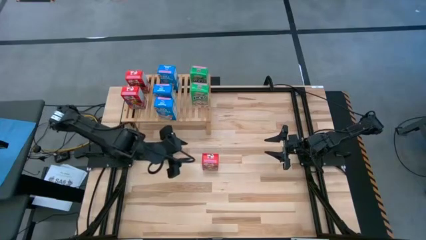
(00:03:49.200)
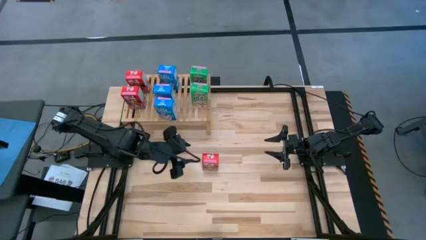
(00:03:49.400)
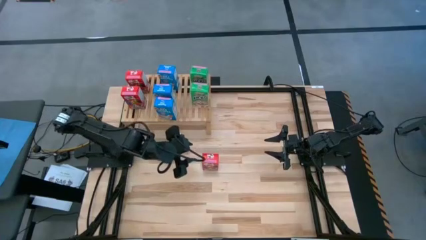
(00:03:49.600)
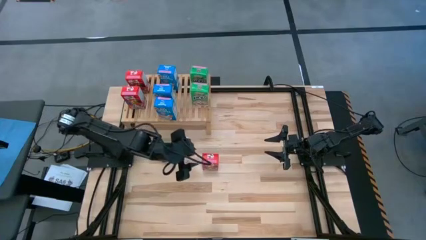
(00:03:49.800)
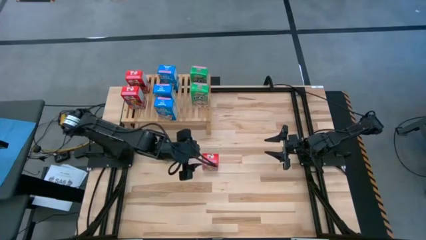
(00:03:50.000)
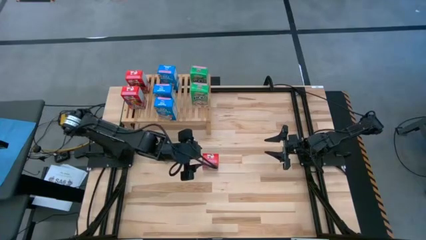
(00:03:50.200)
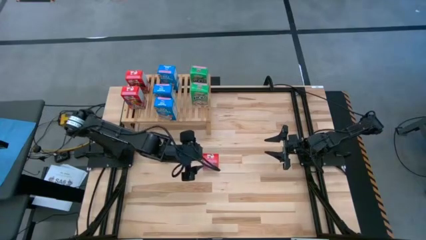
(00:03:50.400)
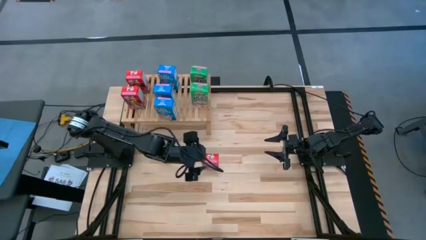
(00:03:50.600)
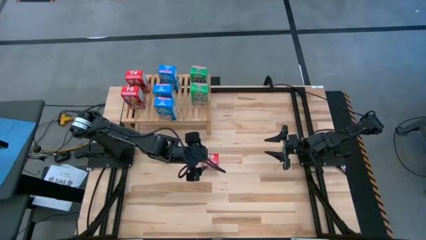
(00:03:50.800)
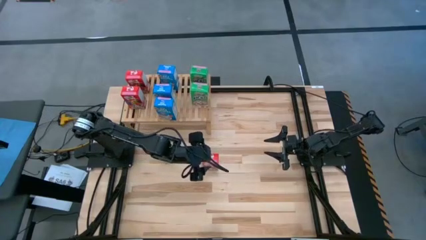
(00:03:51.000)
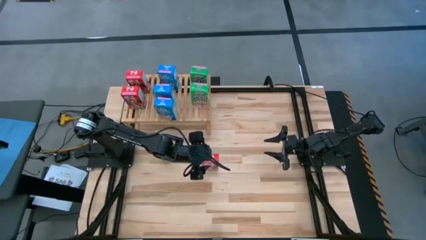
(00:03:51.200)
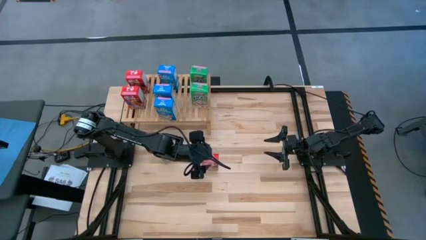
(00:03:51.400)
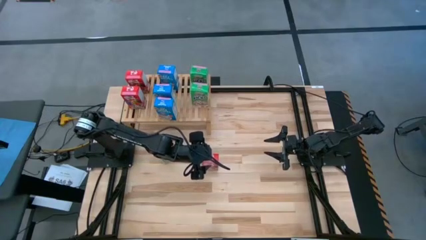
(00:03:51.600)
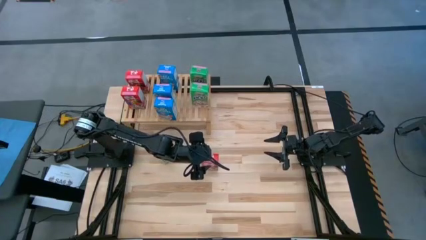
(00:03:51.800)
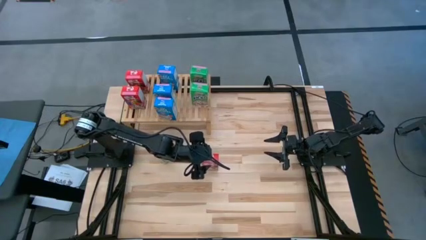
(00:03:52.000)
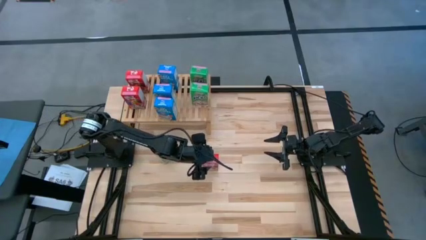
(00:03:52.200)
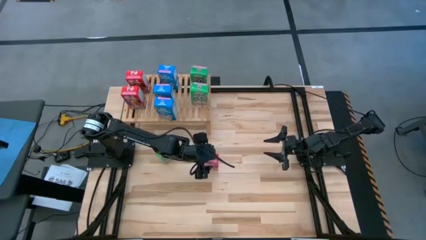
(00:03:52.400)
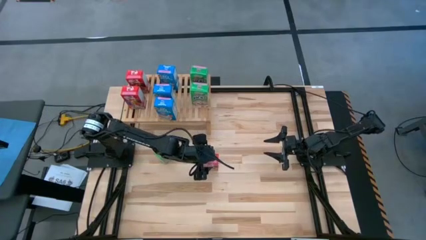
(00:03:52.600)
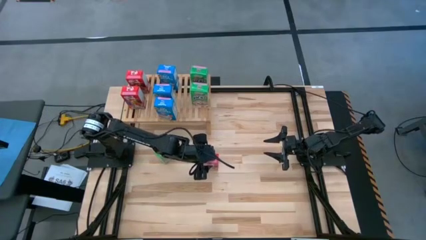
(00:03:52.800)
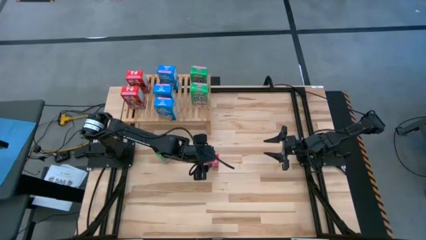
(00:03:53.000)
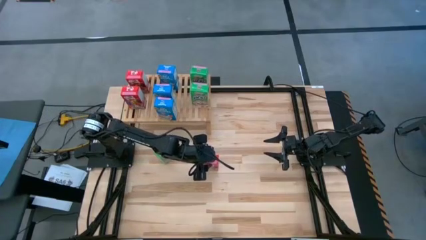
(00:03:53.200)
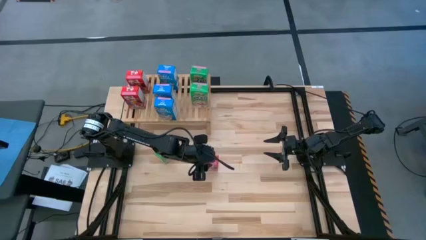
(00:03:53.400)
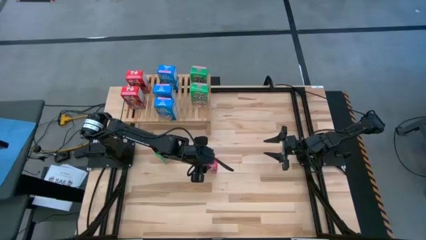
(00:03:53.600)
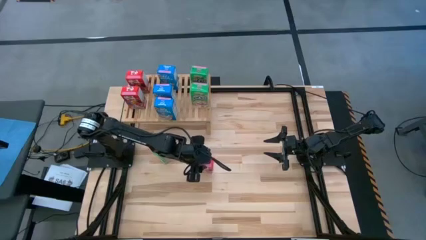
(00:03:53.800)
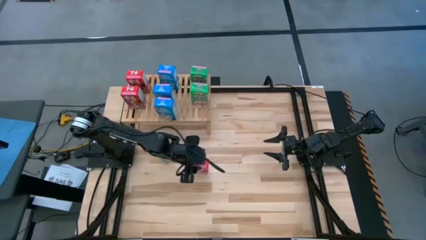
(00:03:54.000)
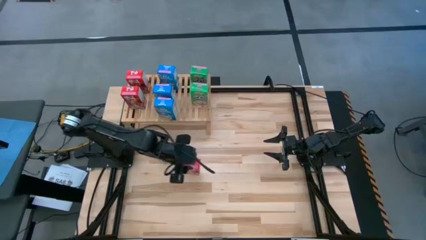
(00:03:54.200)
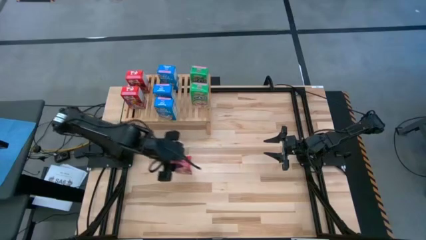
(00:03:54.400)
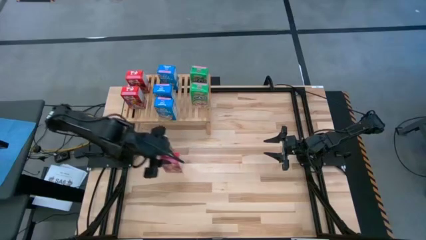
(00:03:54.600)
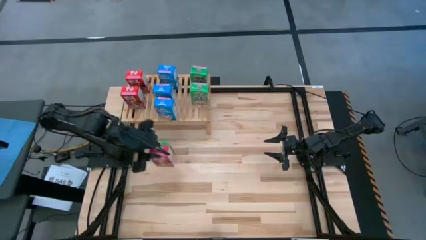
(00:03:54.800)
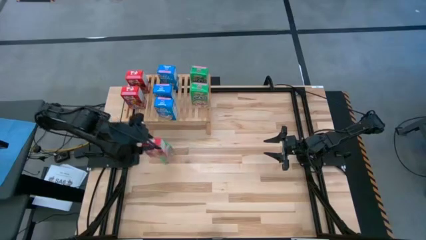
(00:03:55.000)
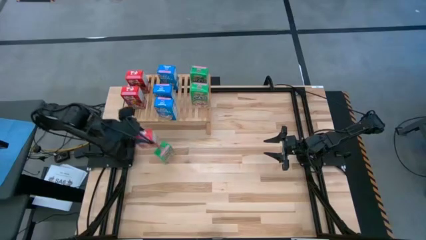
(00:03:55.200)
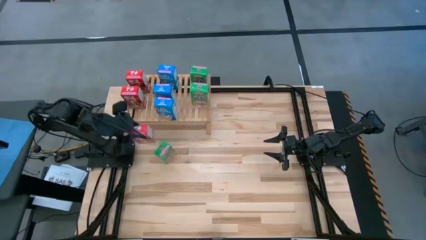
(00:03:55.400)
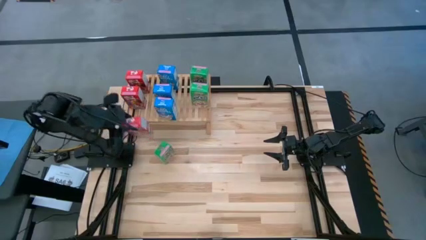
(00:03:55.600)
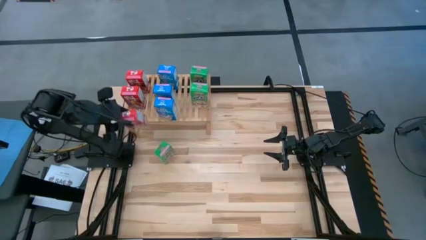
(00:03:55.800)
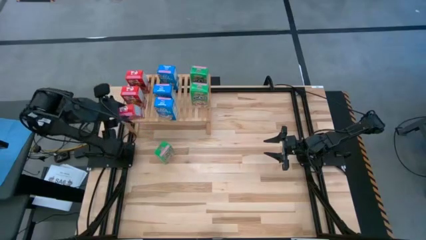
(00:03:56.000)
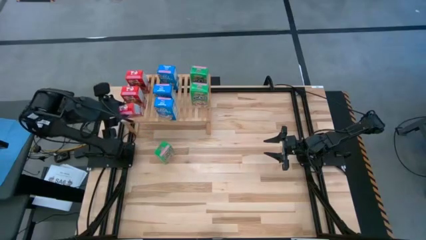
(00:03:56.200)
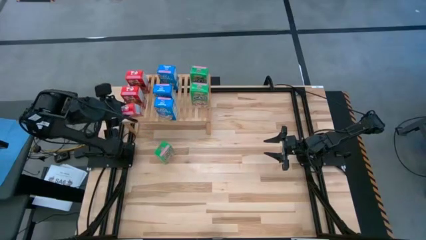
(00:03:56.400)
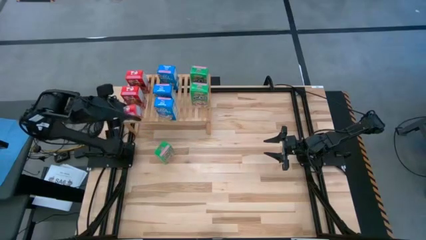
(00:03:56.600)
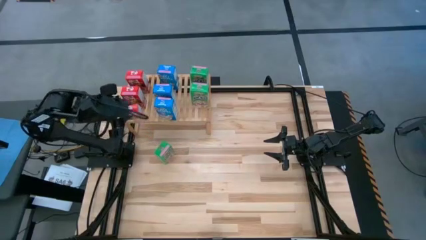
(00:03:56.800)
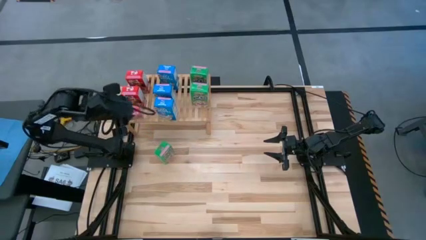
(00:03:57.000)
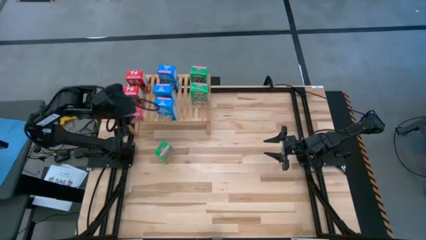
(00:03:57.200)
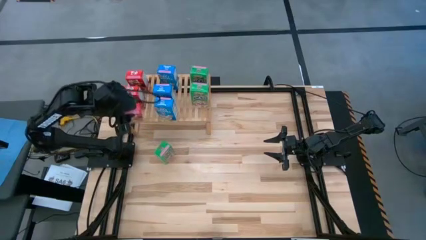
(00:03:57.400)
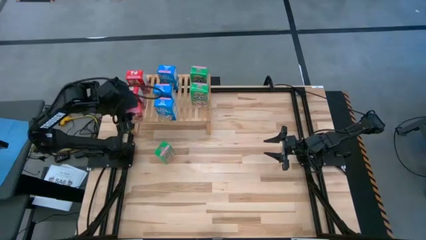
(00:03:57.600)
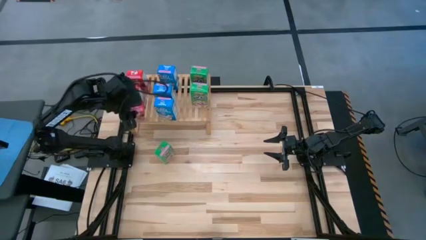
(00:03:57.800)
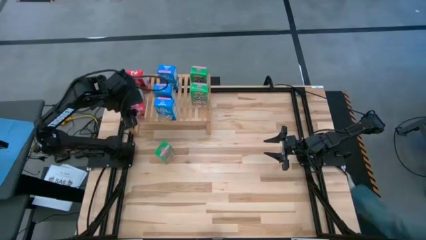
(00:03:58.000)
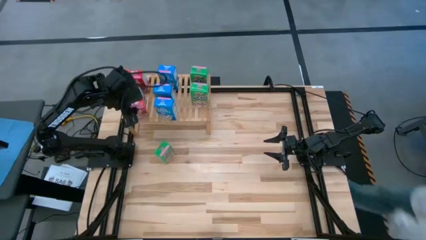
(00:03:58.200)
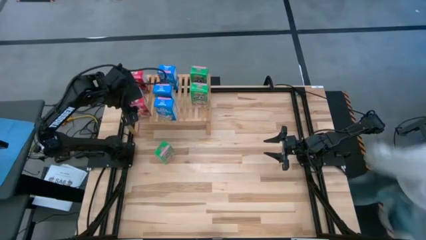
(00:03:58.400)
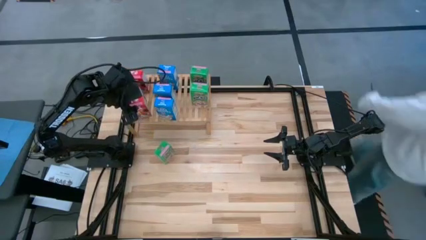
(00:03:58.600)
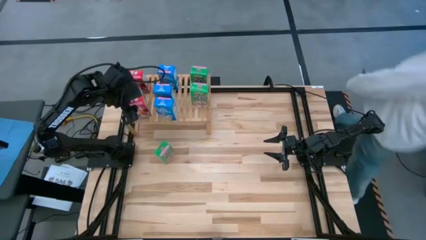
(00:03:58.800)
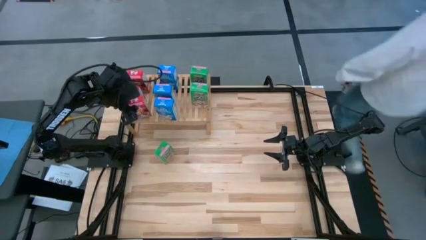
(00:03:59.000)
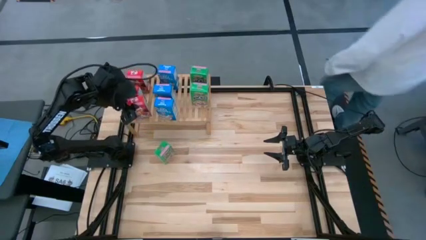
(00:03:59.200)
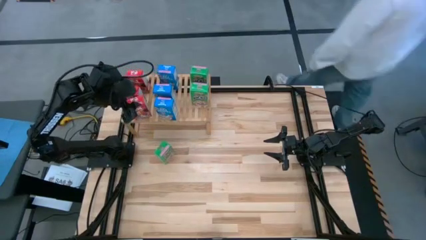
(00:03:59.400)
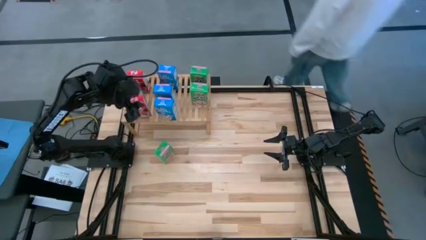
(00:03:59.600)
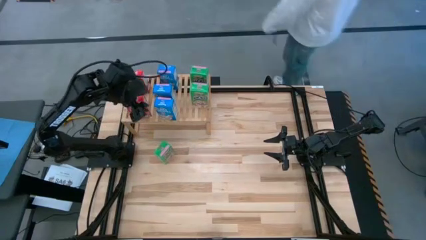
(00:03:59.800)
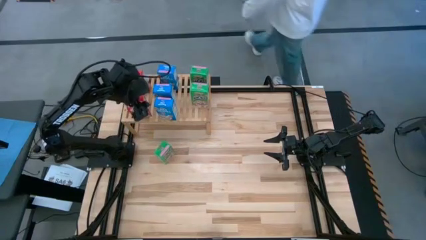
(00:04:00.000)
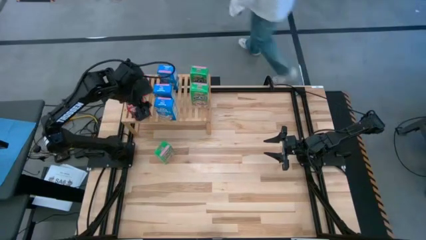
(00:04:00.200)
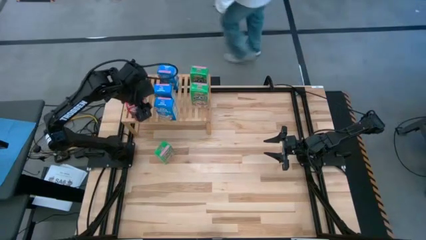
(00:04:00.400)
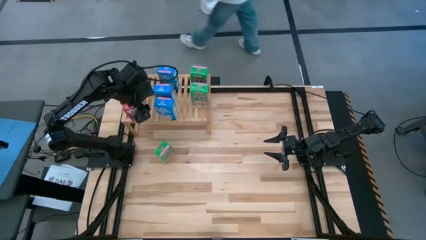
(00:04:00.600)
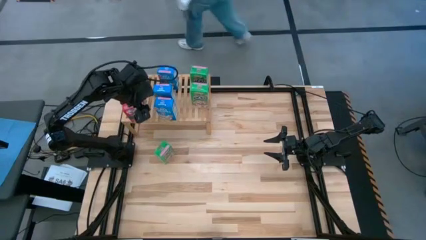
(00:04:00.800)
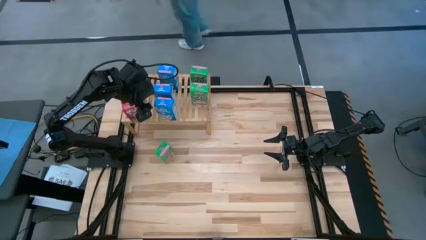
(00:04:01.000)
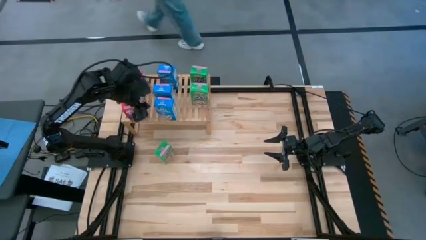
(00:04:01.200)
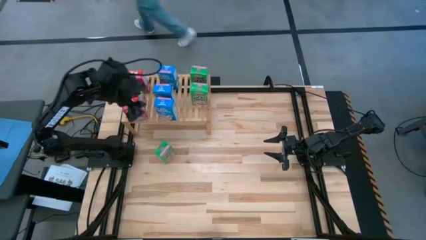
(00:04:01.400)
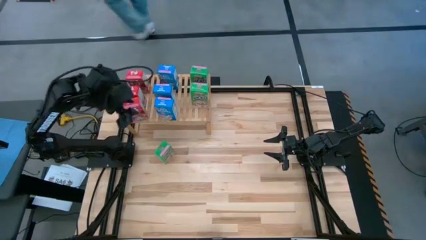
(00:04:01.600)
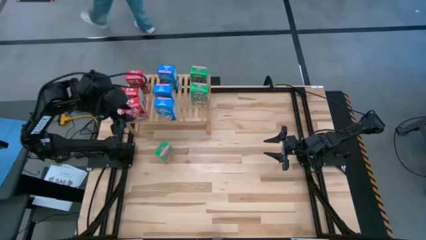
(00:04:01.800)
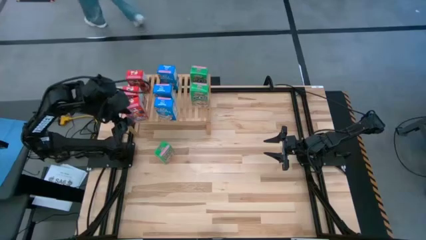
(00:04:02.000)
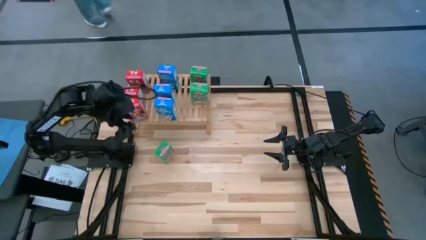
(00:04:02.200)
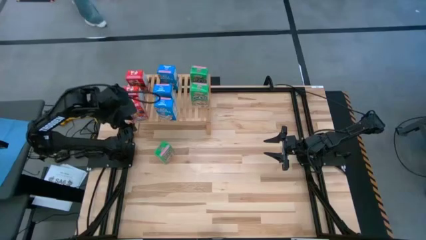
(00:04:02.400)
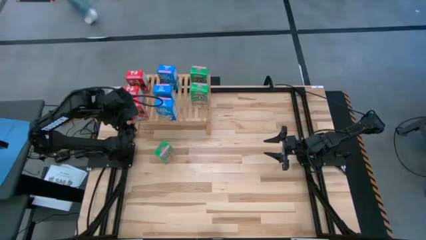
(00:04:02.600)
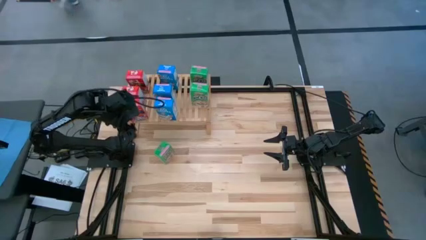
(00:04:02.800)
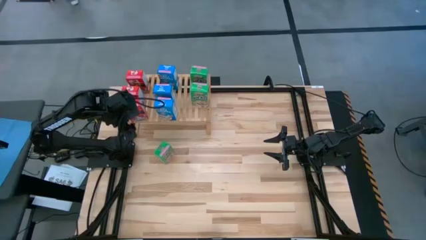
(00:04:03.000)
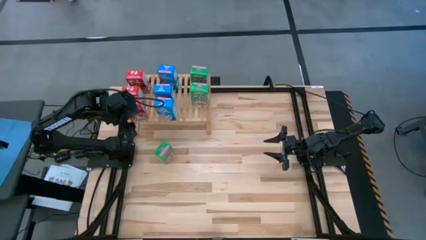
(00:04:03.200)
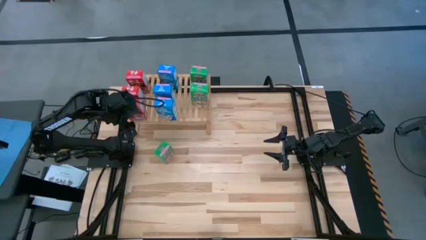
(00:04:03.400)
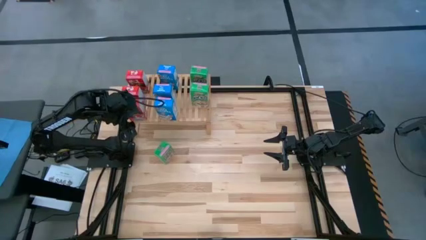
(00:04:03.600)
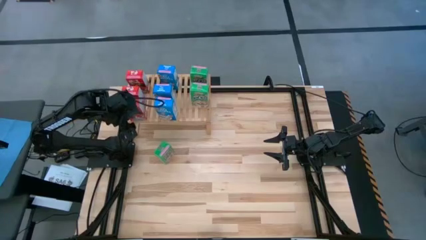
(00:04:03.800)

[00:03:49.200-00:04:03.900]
Task: Stack cereal on shelf
Put the red cereal box on the shelf aligned with the red cereal boxes

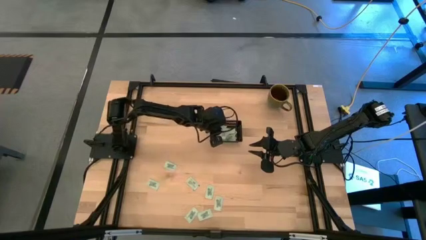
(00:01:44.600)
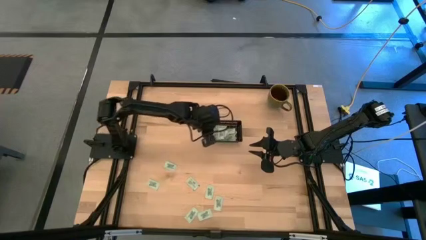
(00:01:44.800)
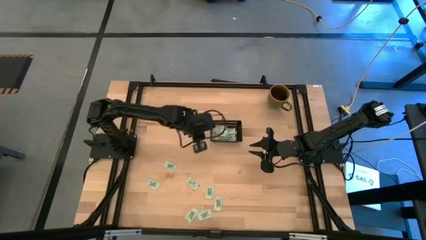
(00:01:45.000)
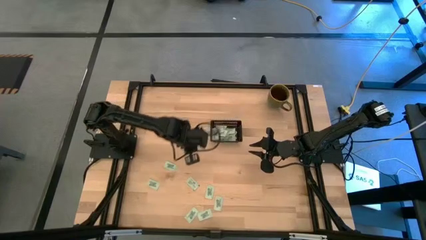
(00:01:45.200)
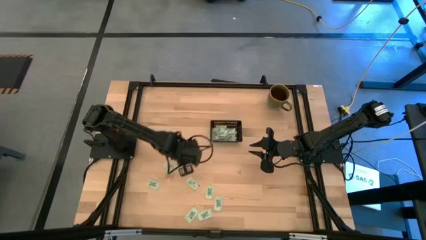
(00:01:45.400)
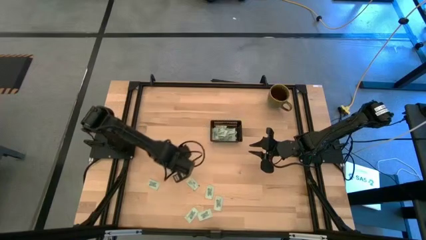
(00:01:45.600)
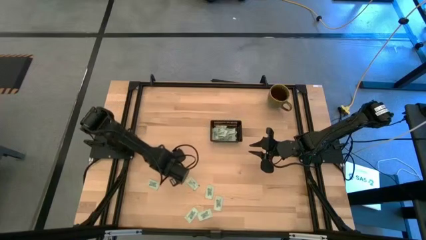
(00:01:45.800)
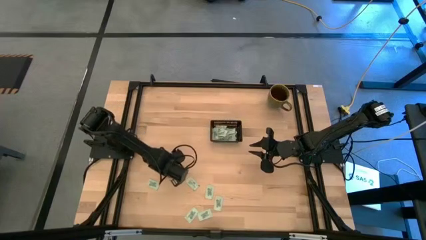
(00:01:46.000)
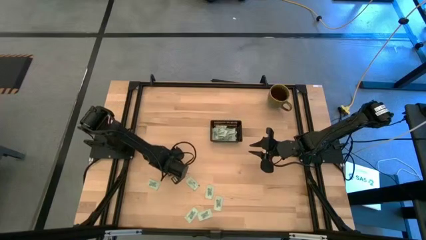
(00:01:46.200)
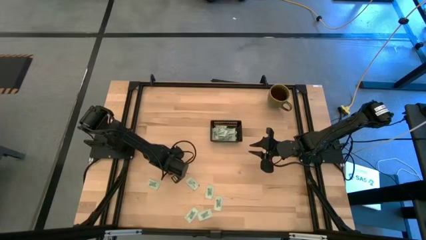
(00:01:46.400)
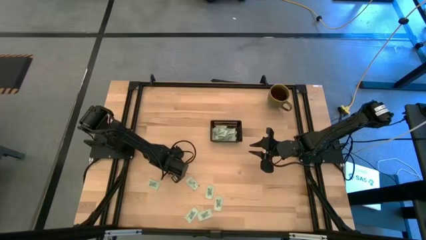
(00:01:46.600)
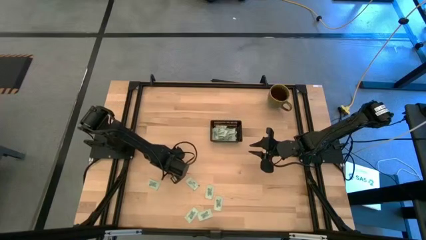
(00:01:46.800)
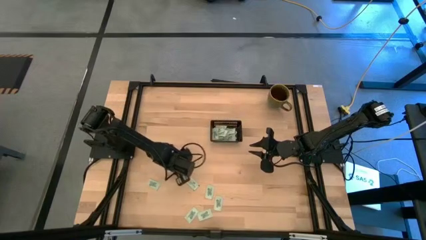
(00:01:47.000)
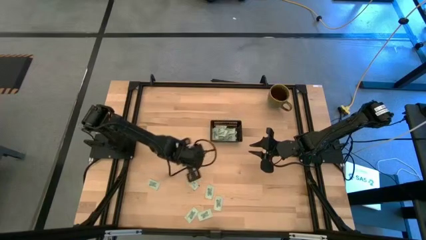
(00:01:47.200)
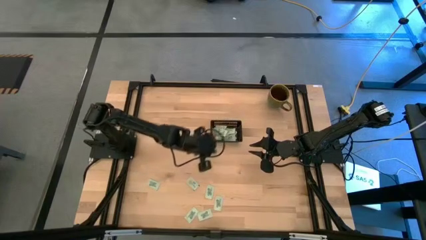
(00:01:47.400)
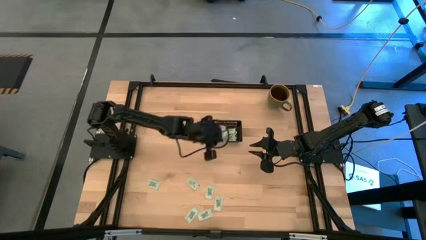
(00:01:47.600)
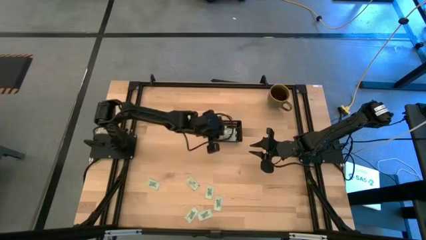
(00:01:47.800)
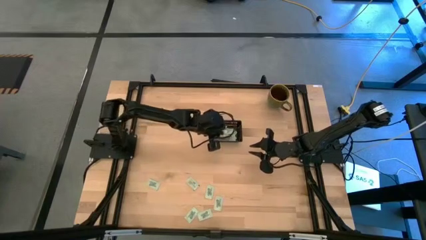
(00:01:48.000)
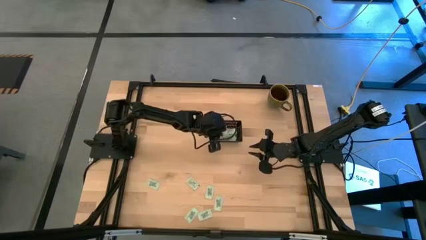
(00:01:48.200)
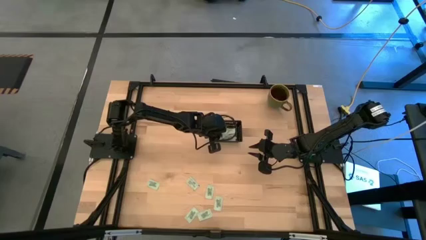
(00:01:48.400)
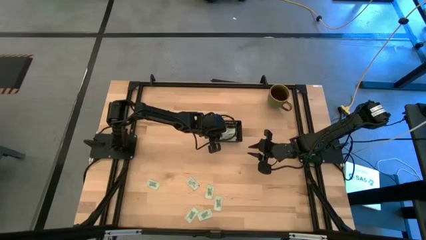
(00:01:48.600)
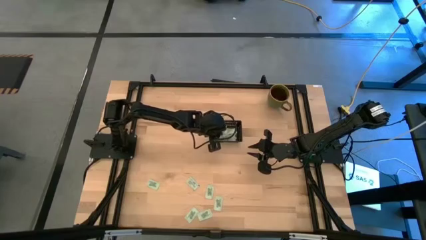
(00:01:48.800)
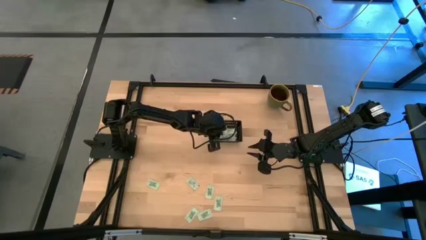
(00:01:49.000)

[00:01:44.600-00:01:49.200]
Task: Pick and place Stevia / Truvia into bins
Put the stevia packet into the black basket
